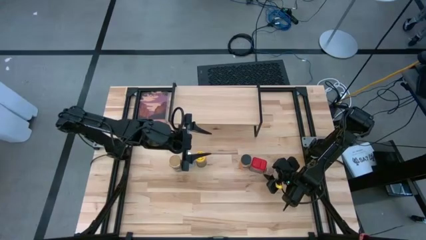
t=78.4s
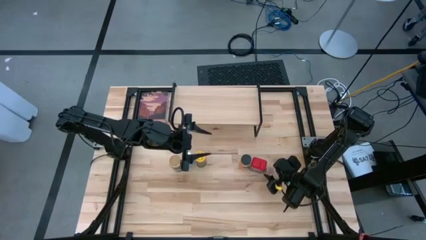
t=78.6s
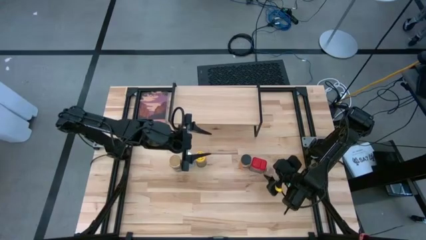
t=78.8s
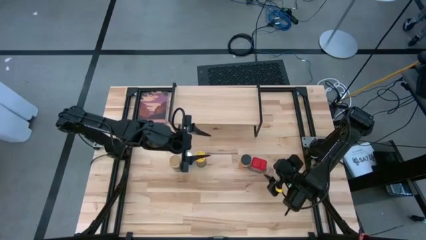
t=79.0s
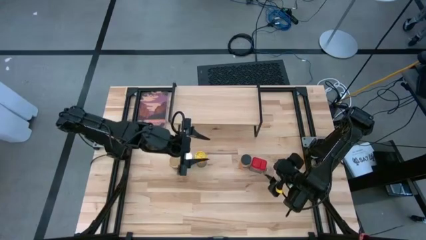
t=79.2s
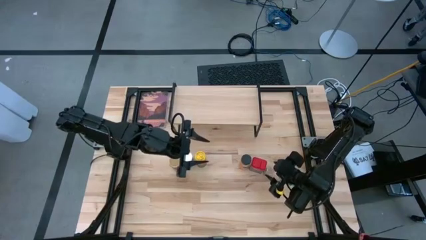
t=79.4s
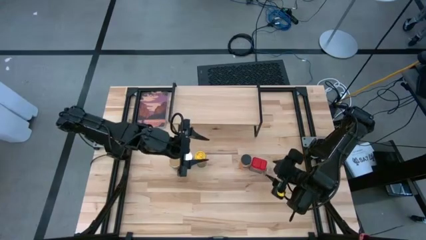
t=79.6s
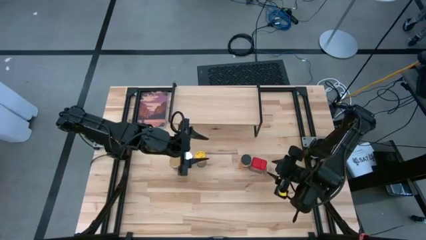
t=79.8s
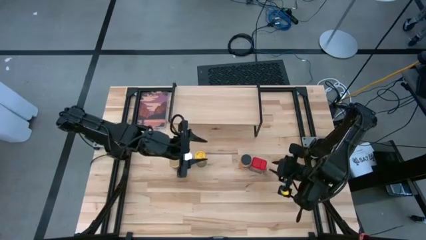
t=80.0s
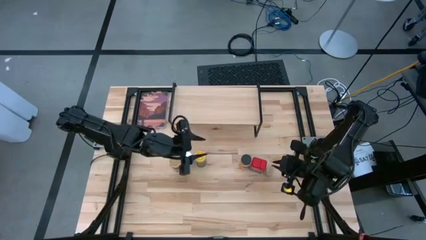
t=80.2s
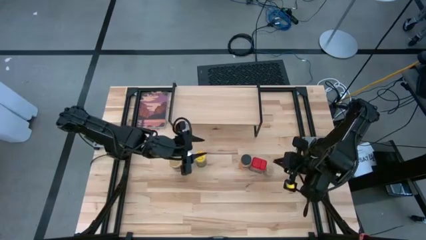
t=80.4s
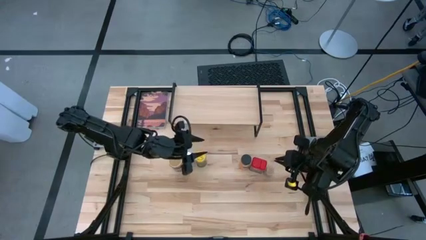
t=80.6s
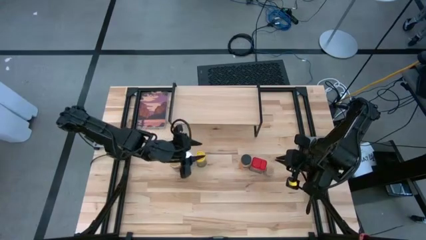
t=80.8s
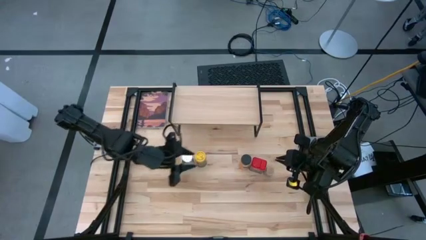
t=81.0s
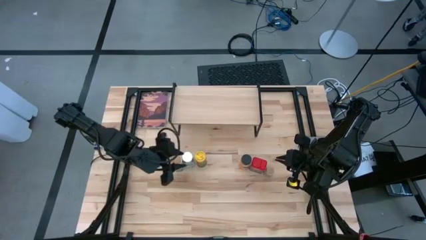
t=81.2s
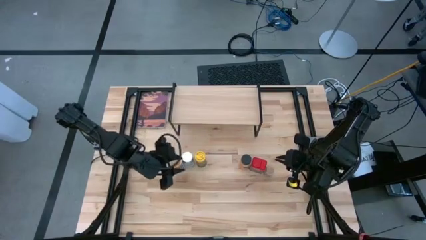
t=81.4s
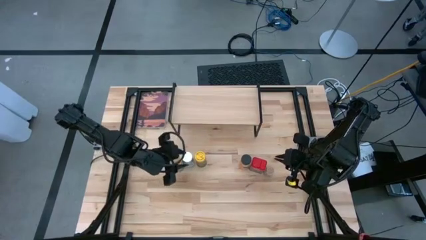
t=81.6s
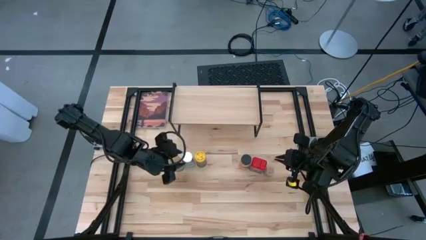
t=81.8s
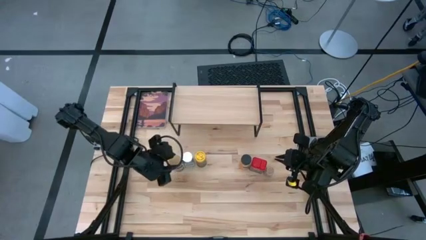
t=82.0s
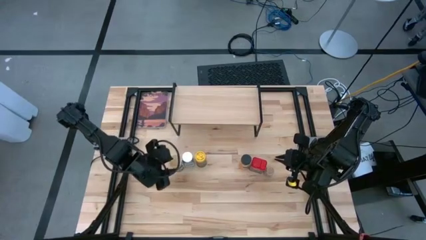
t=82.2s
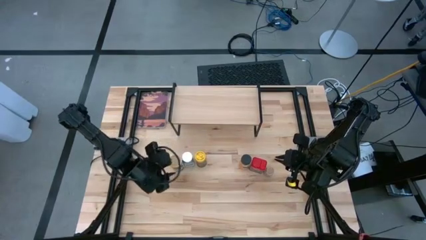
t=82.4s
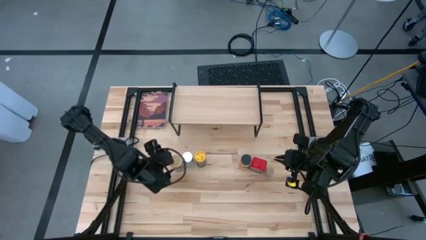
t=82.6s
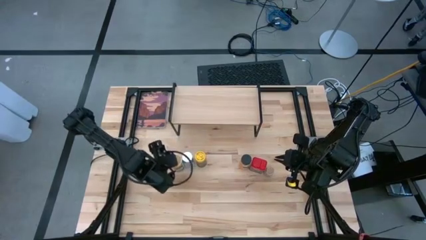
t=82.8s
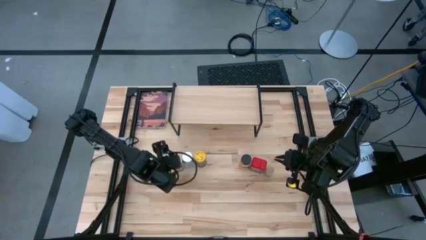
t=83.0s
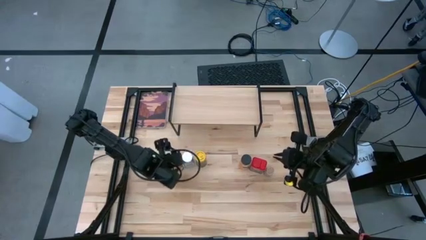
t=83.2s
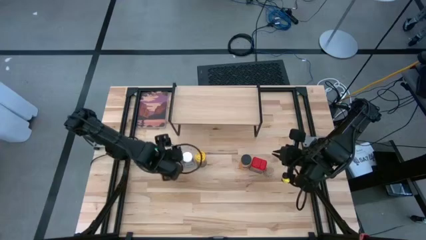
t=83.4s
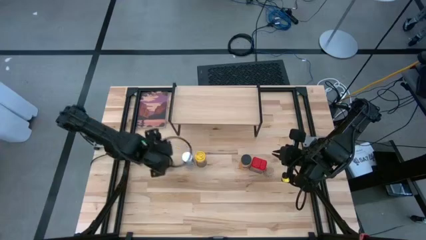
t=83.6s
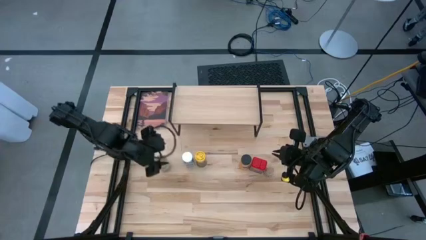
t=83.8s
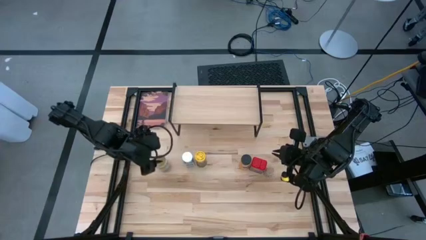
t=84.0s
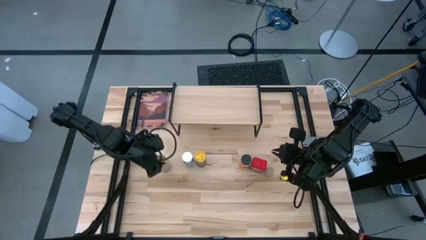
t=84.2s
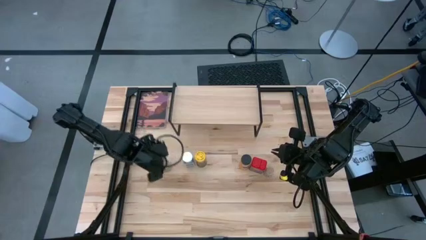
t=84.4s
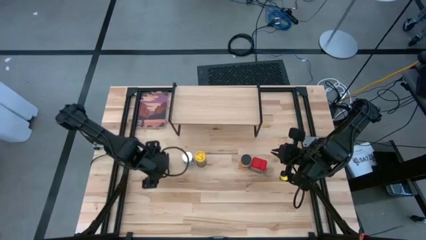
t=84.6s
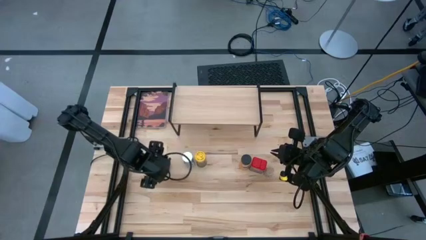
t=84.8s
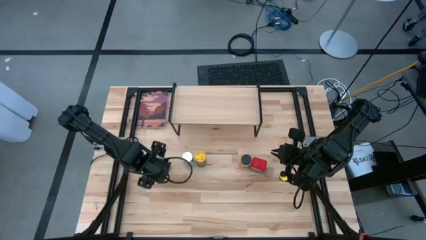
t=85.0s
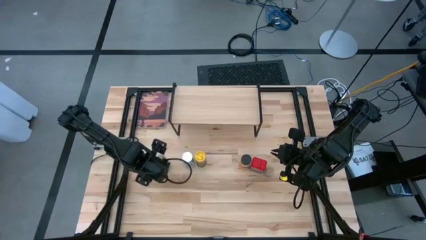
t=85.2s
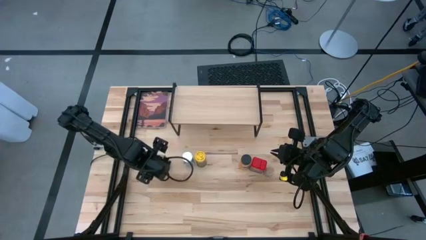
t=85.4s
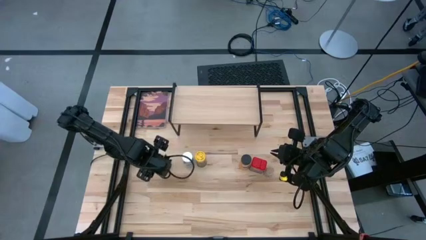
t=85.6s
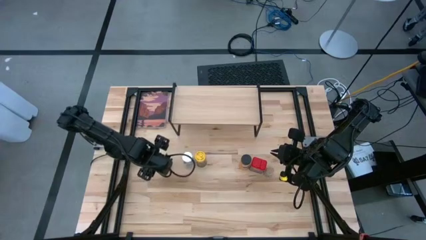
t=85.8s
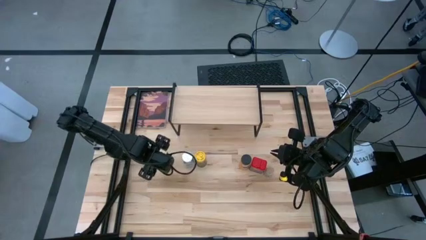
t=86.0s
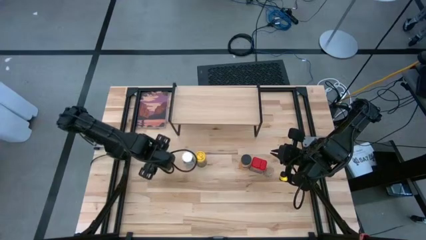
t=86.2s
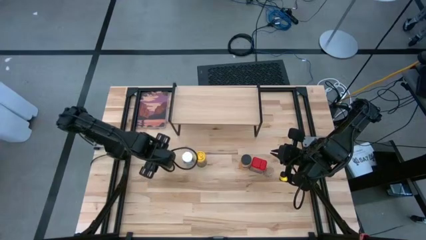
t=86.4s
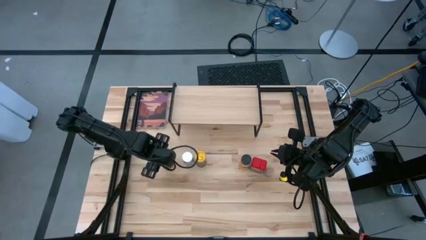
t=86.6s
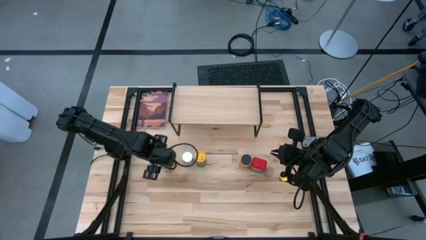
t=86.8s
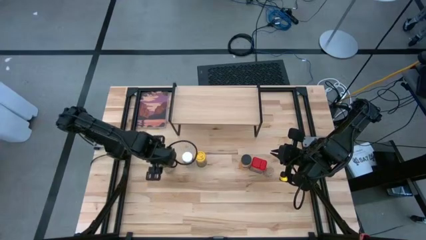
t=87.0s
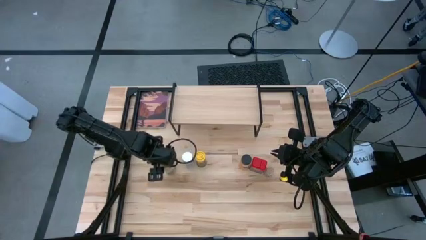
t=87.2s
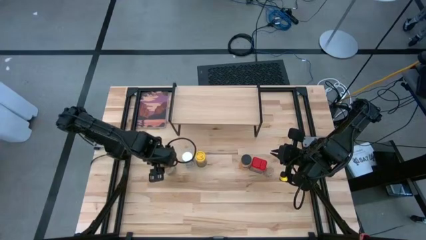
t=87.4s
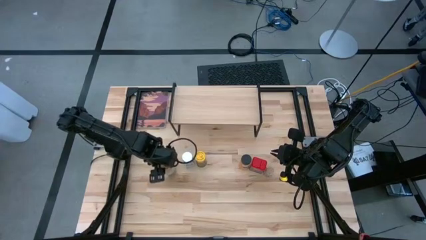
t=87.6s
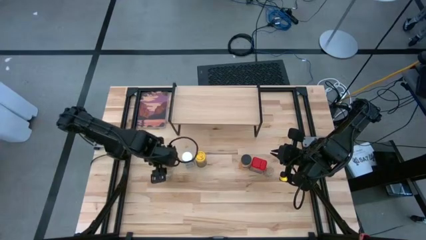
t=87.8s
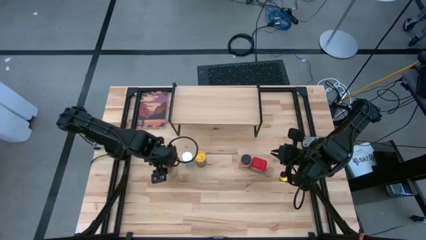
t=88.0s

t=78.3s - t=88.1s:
Task: Shelf spices
Put the golden seasoning bottle on the shelf

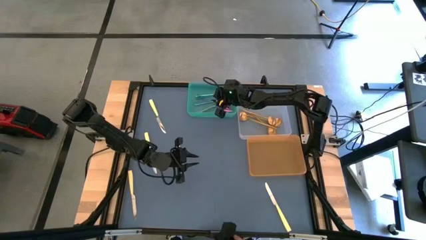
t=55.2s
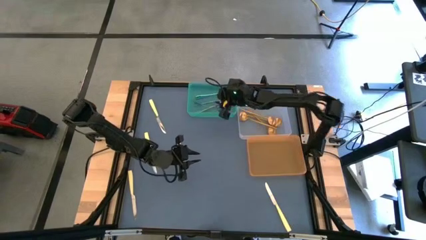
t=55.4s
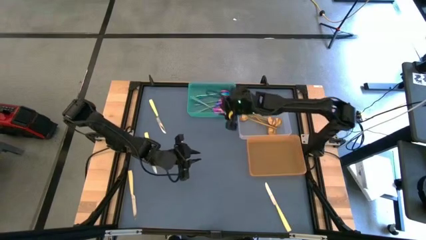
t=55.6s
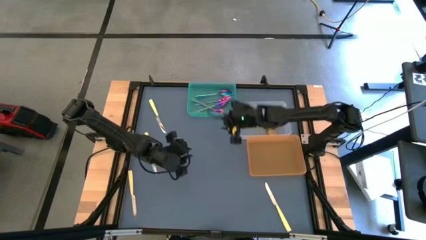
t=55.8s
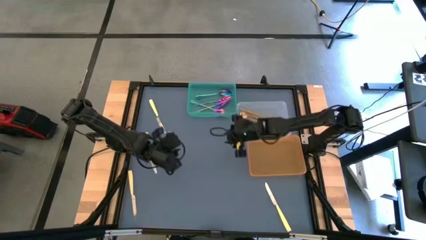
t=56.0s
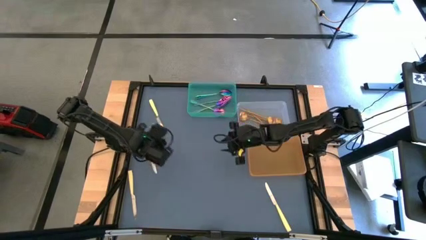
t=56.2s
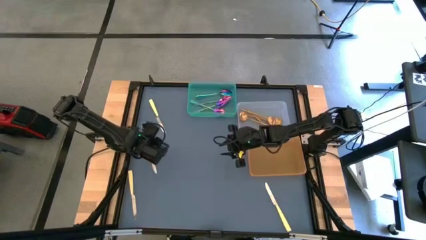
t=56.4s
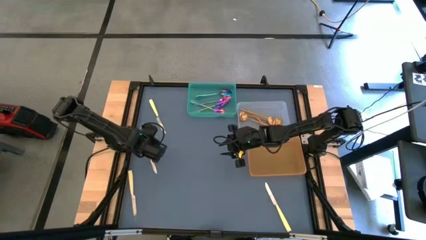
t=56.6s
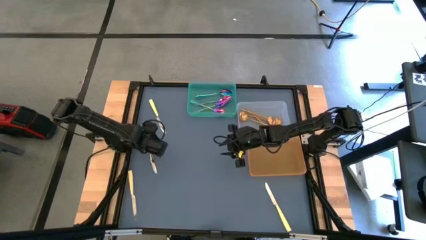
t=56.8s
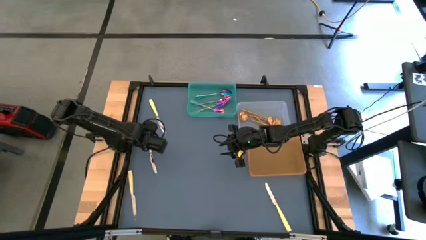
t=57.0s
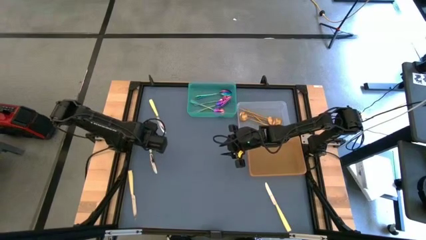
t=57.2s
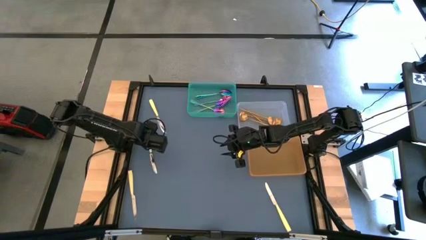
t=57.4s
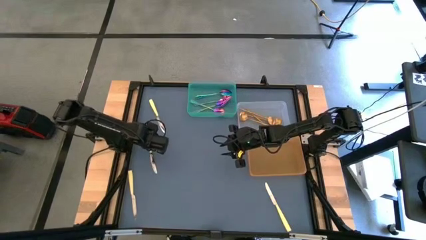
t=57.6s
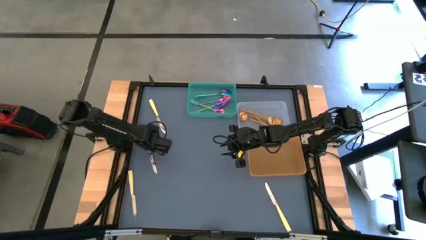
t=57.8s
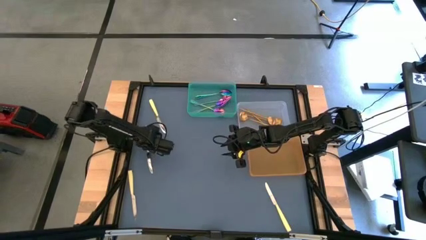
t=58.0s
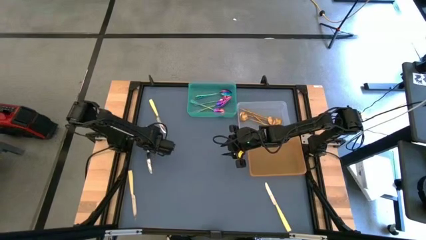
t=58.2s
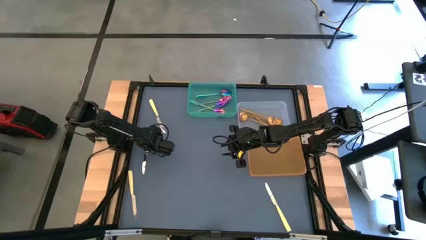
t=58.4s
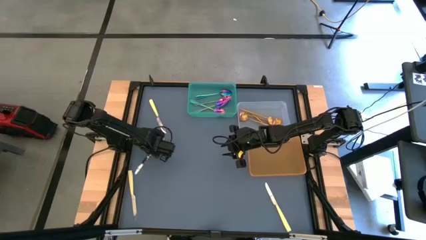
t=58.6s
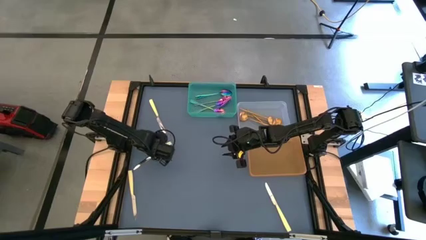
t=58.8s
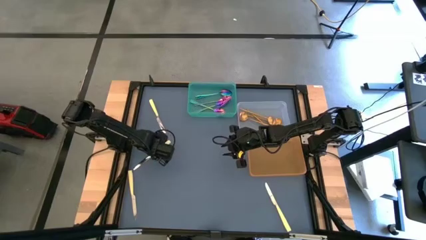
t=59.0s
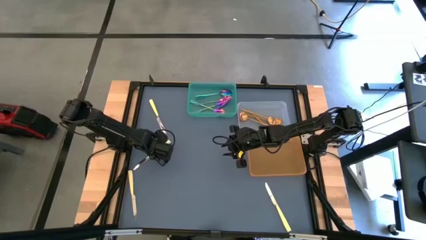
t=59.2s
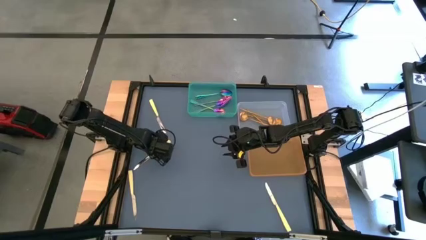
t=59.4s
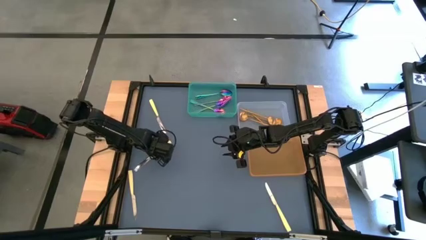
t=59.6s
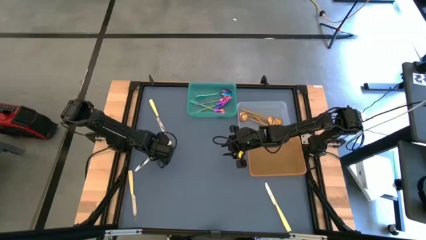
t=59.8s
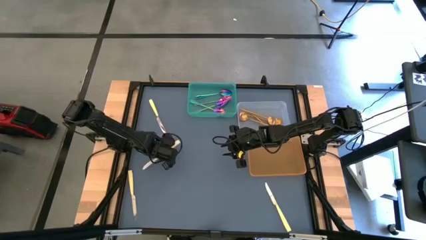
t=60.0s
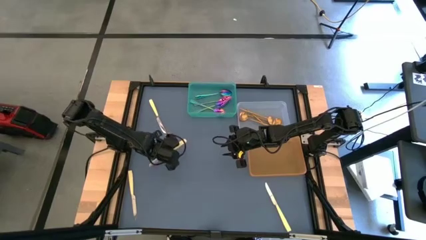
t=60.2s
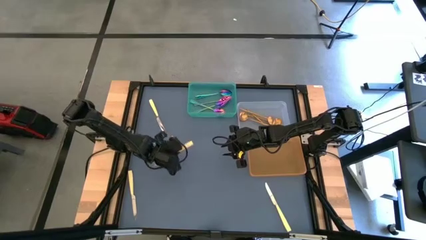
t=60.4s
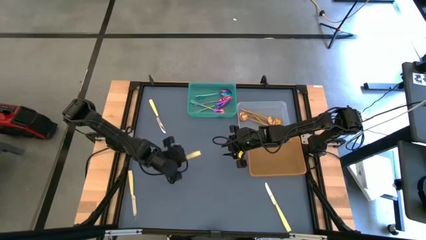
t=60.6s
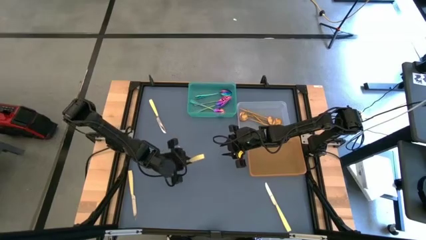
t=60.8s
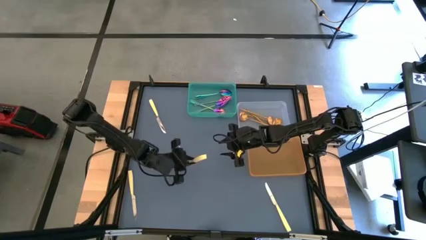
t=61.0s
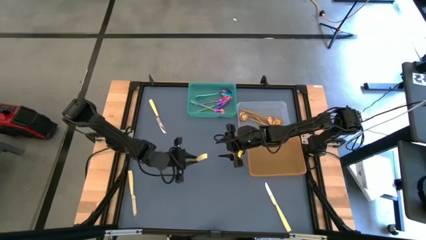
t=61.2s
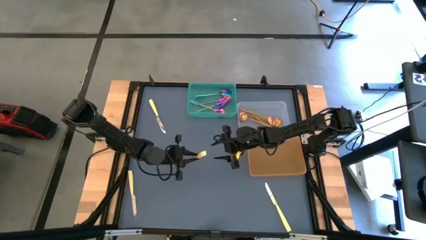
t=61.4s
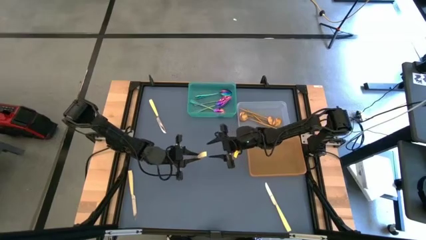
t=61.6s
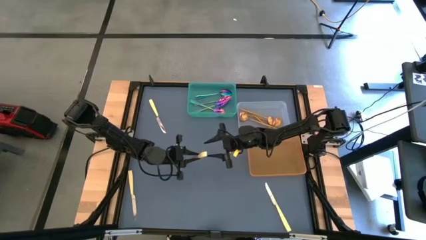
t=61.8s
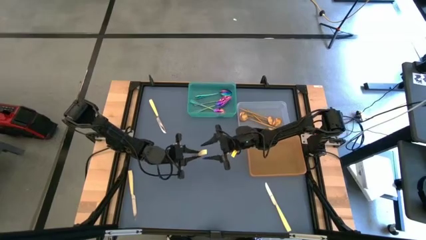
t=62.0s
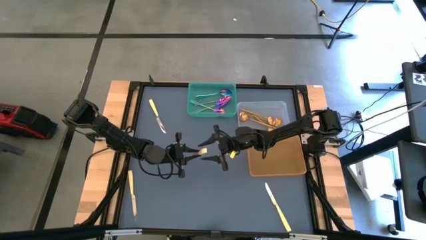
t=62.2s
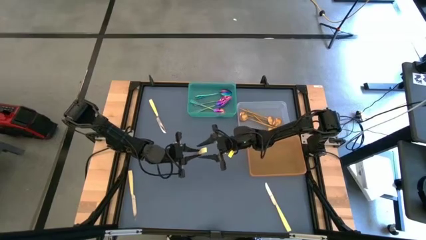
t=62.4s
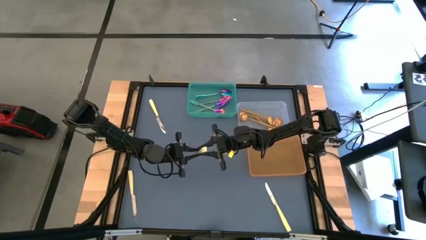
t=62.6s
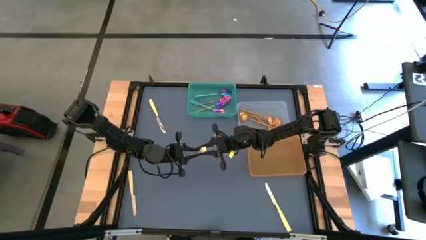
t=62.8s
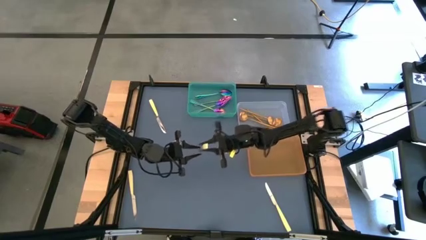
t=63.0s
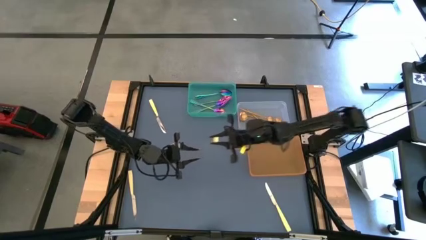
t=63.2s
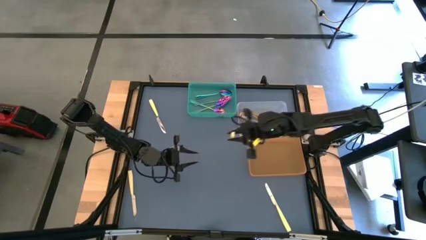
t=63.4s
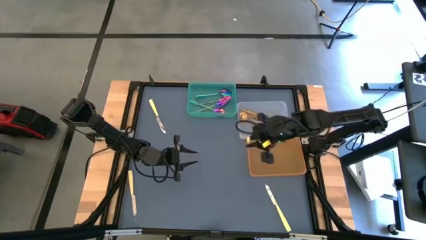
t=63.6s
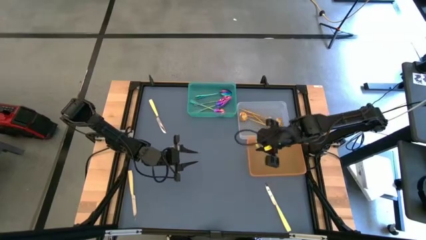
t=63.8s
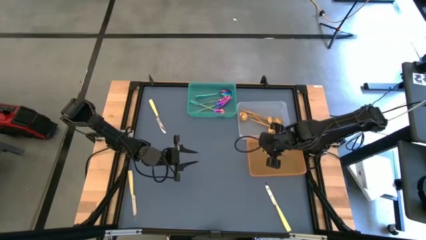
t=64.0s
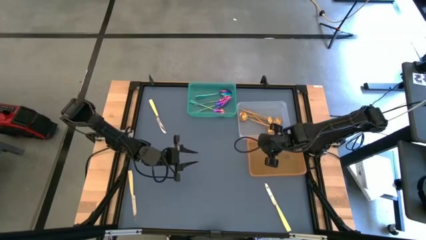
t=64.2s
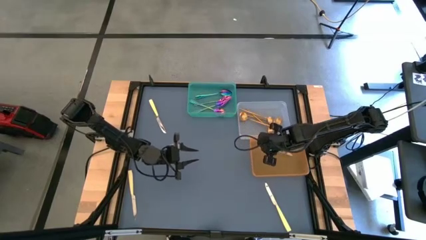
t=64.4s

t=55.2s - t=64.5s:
Task: Sort silverware by color (type)
Put the table knife into the orange bin
